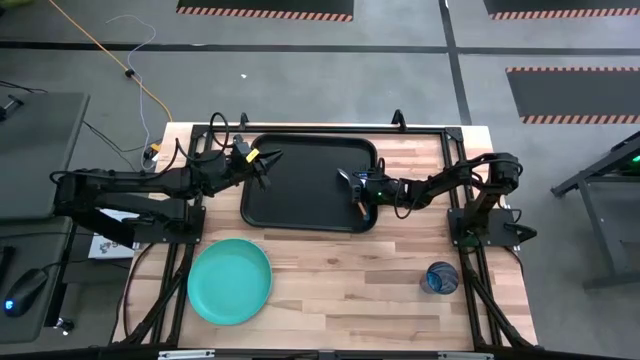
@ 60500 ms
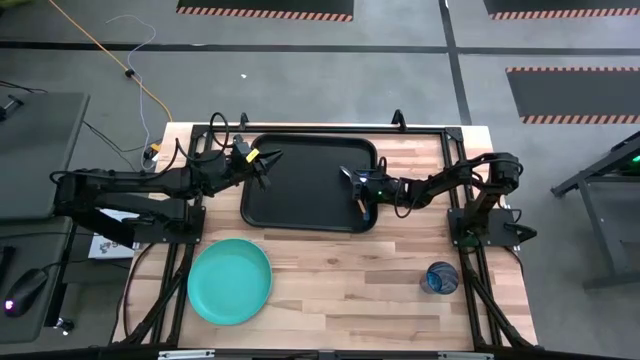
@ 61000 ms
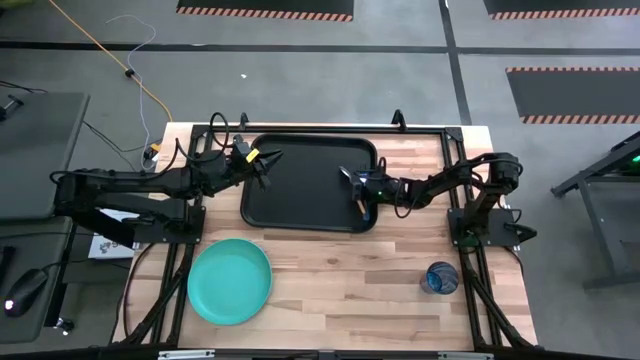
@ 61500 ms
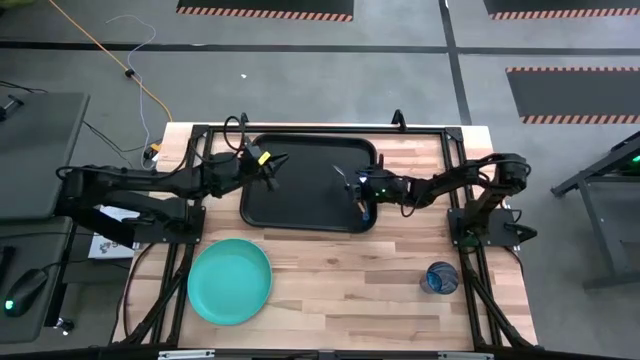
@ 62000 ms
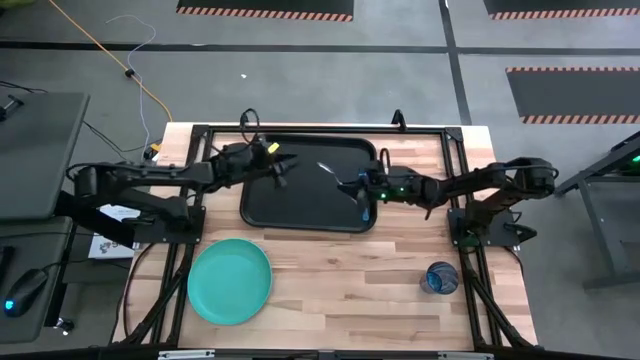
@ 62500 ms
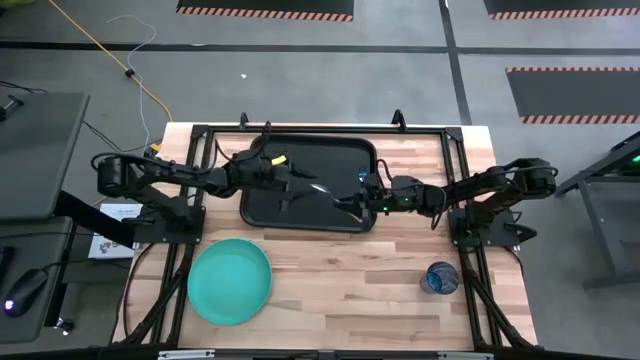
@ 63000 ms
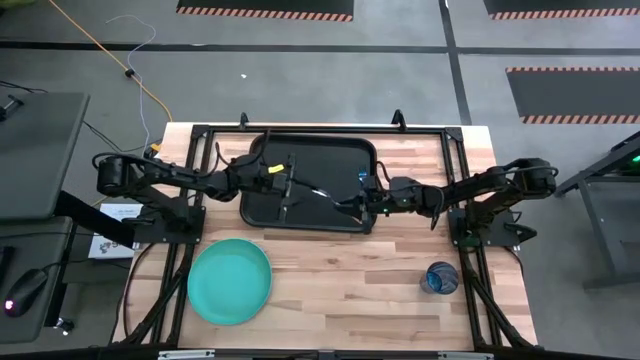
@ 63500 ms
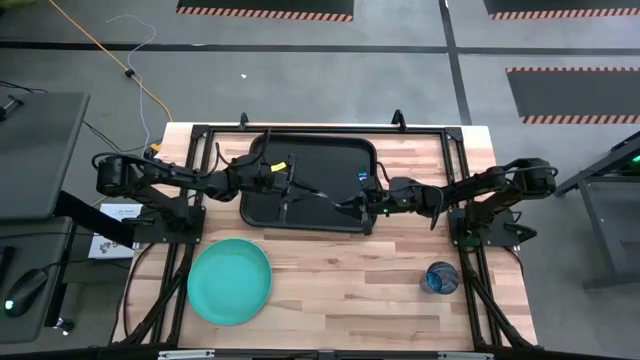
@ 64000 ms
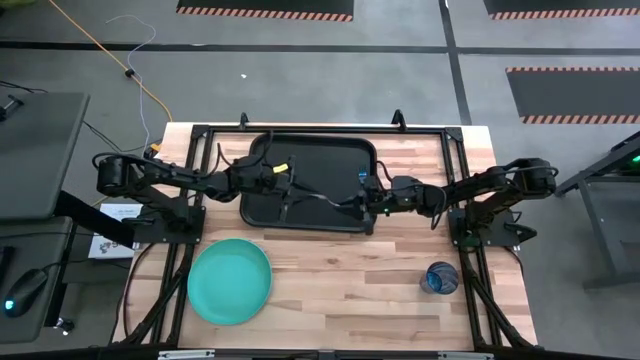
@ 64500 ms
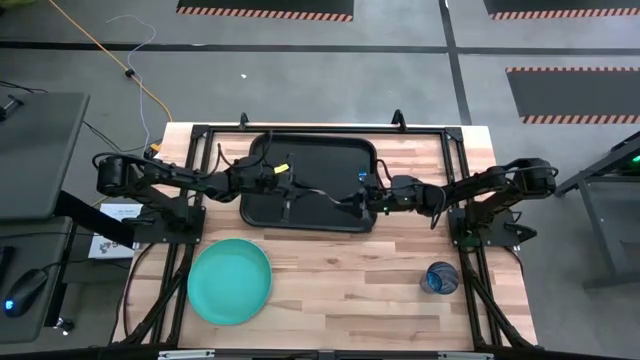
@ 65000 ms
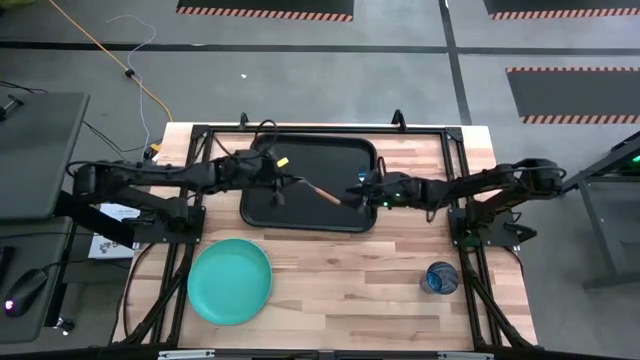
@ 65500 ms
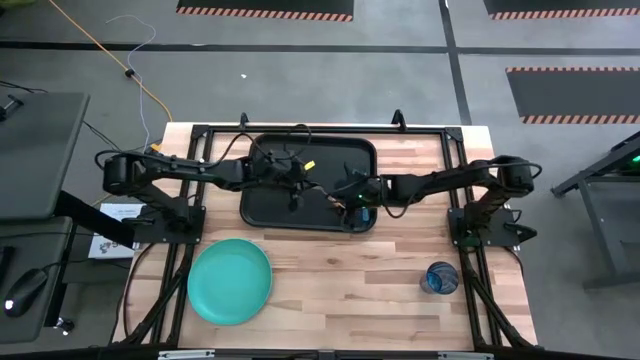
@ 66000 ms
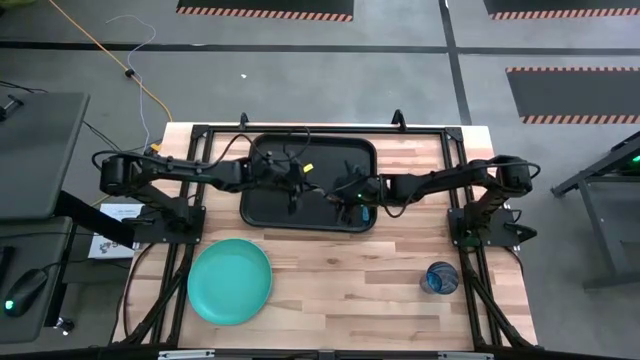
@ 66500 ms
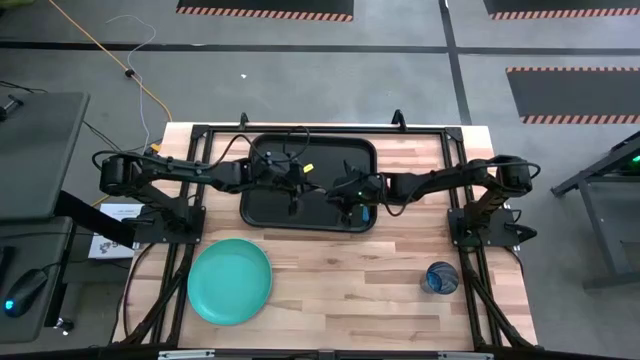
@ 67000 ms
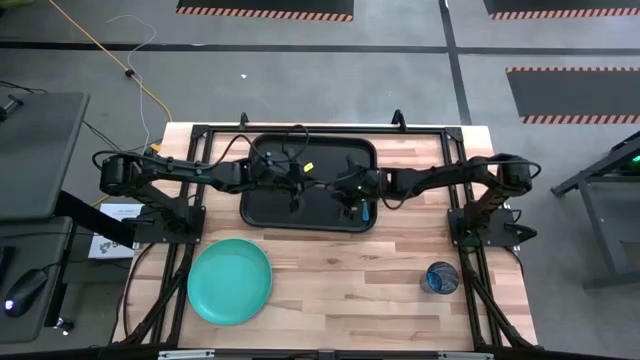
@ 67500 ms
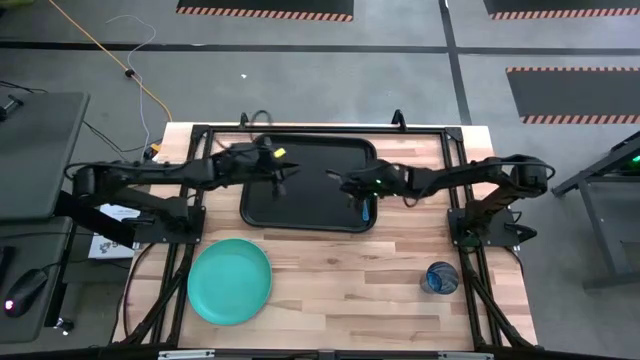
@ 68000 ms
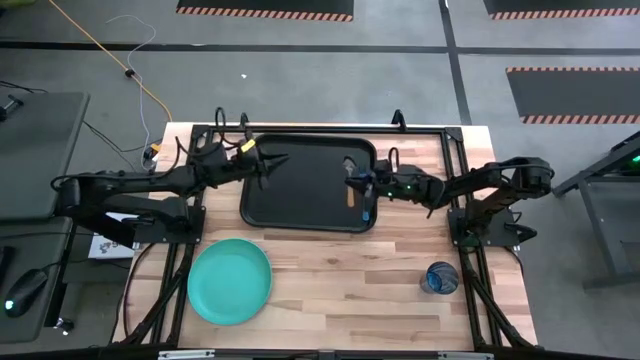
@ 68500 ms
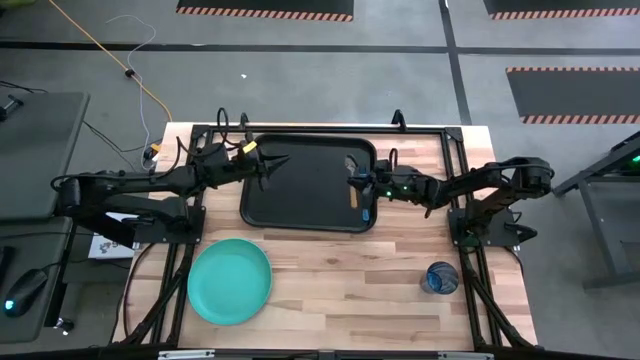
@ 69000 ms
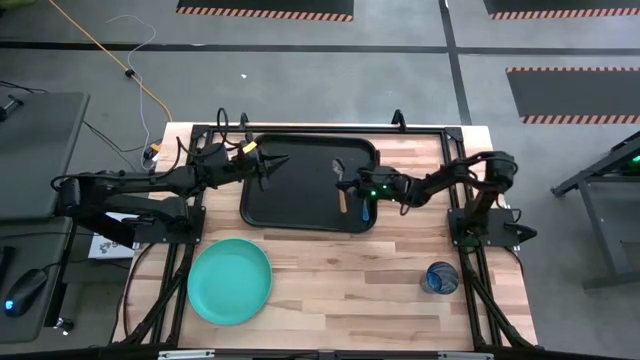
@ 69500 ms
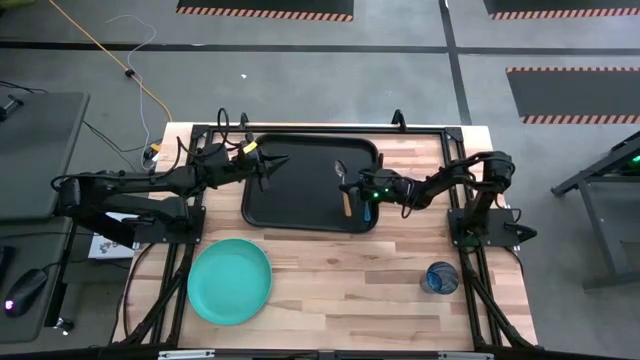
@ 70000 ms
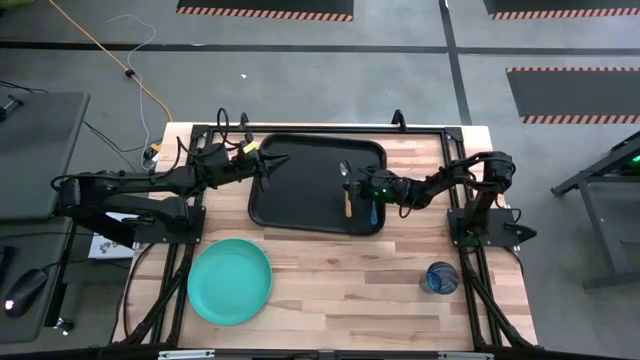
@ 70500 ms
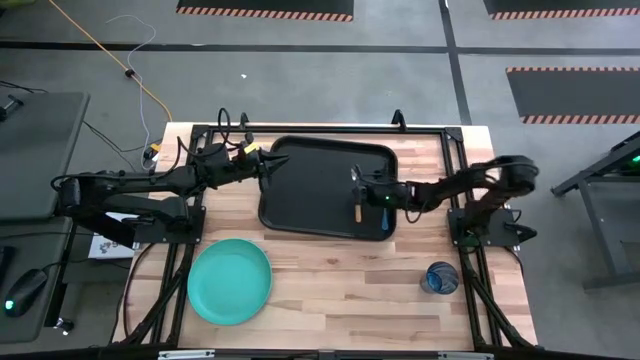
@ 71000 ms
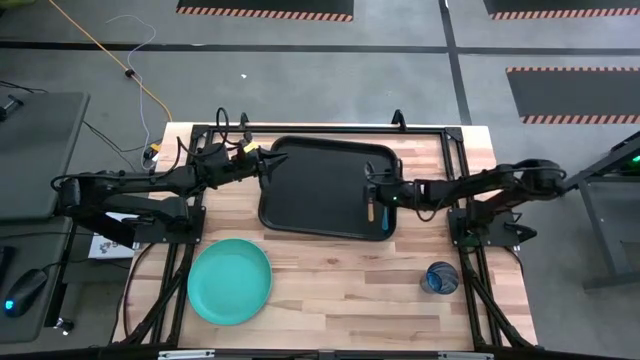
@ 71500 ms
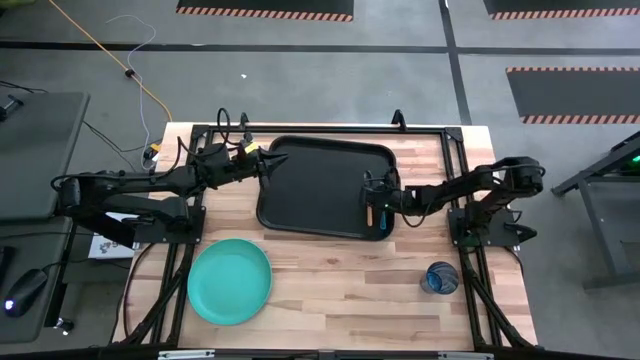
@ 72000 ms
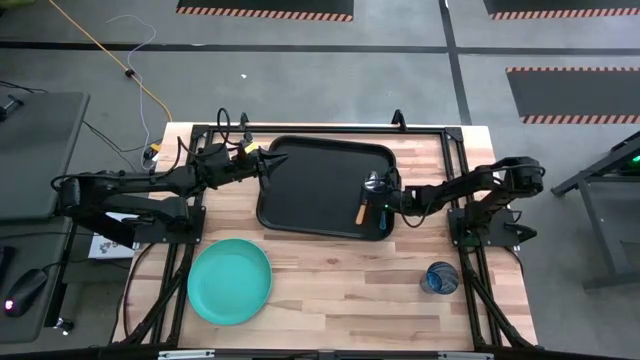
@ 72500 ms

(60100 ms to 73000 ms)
Task: Pick and place plate/cup/fork/spoon on tray
Put the yellow spoon on the black tray to the left side of the blue fork

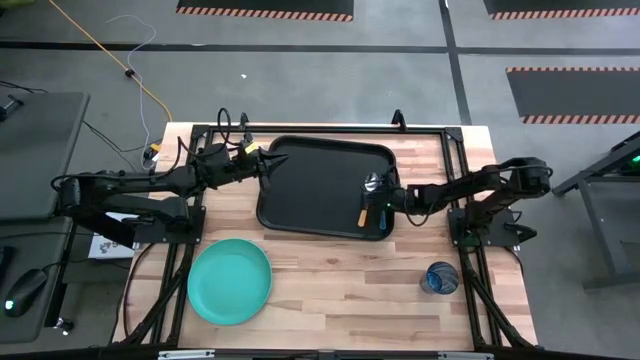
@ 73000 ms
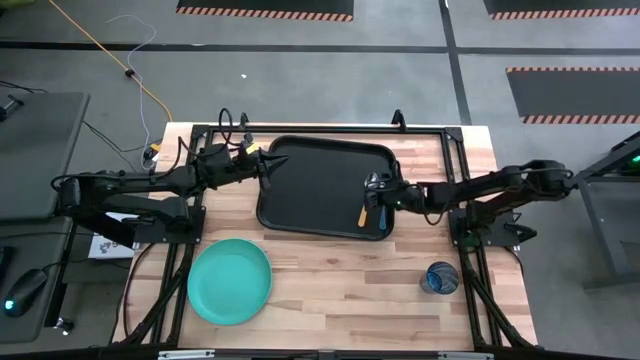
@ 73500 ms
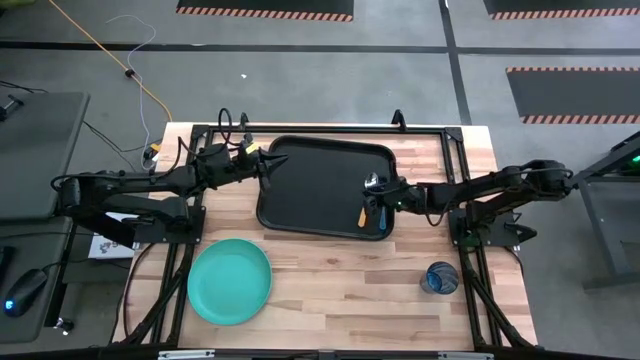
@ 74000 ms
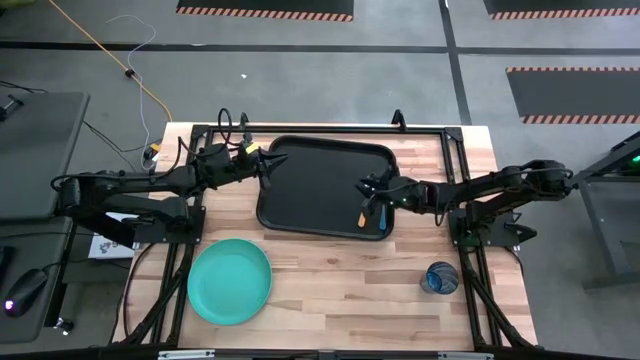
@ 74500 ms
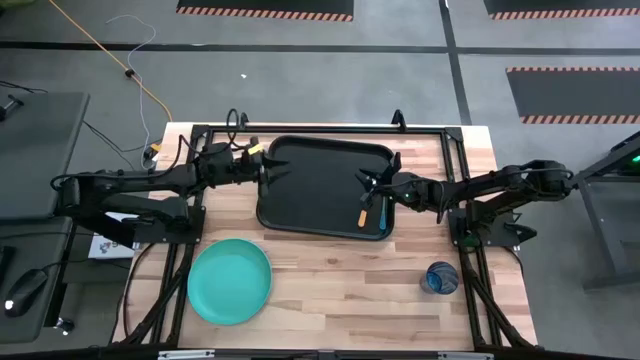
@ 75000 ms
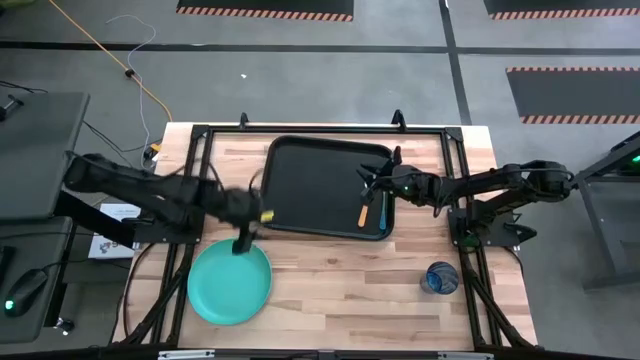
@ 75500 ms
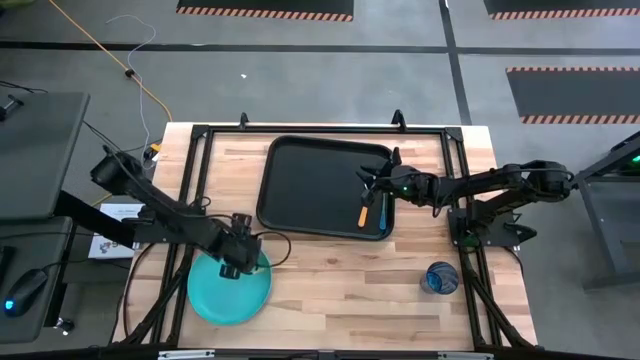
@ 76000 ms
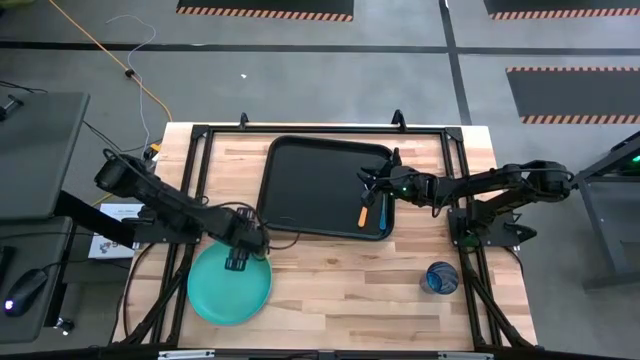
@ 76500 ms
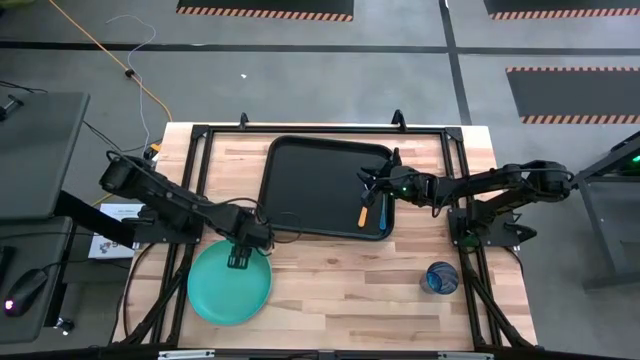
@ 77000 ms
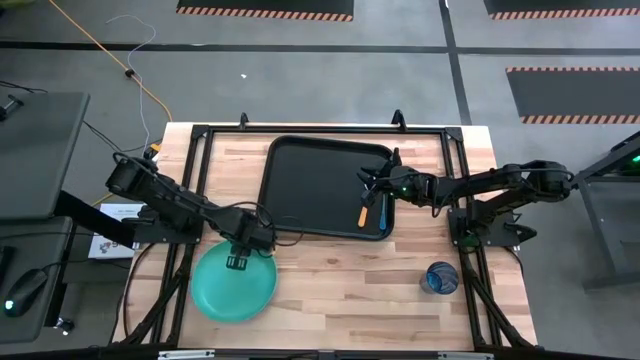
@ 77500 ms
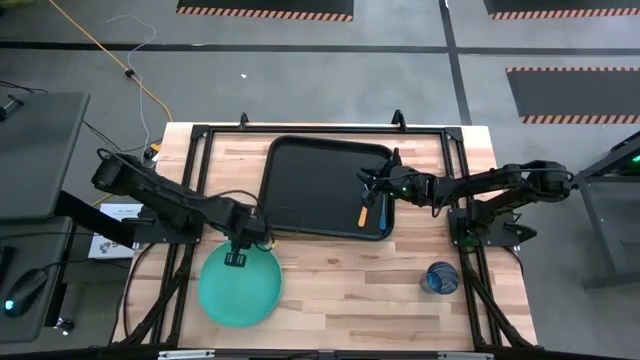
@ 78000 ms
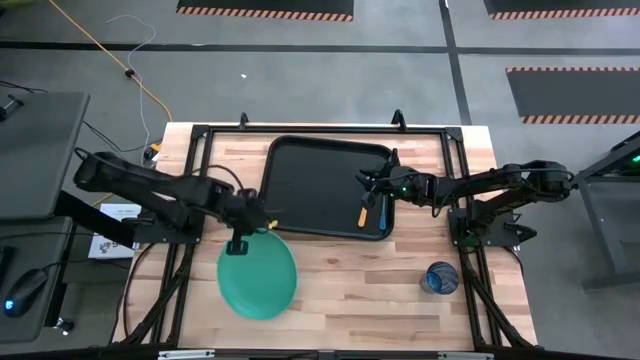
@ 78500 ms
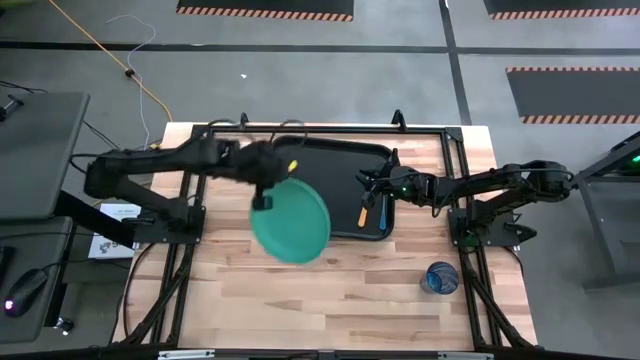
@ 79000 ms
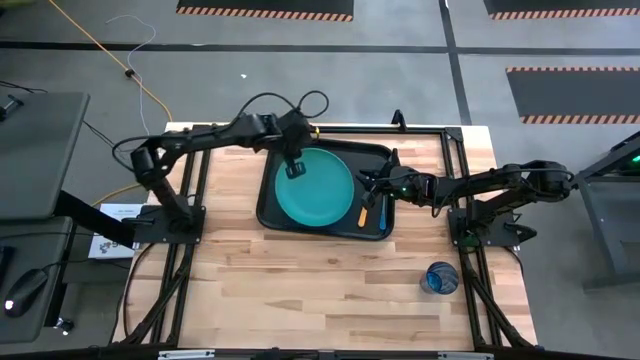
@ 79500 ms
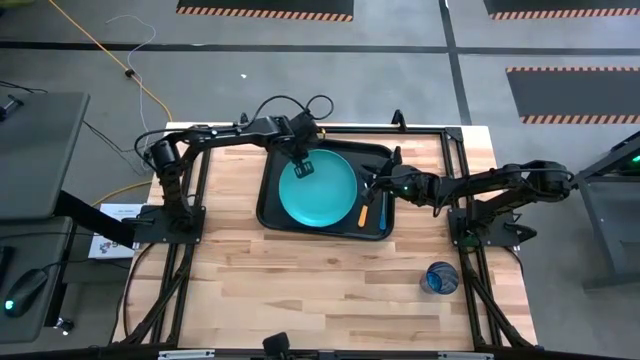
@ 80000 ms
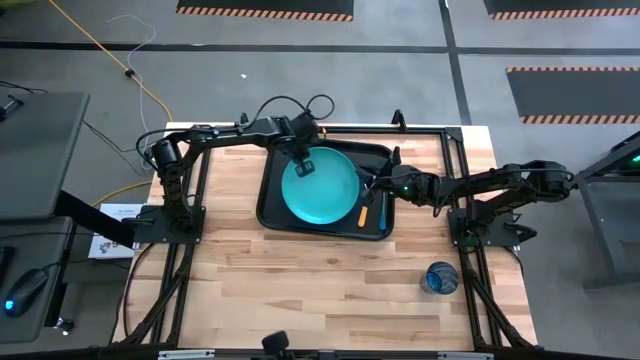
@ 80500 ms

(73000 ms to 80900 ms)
Put the blue plate on the black tray to the right side of the yellow spoon
